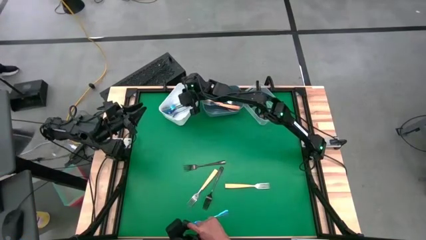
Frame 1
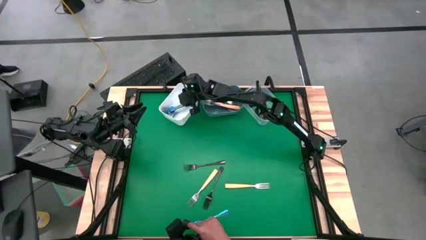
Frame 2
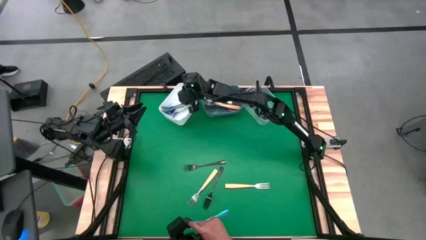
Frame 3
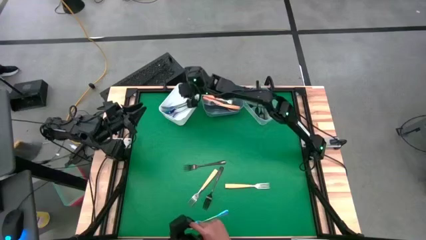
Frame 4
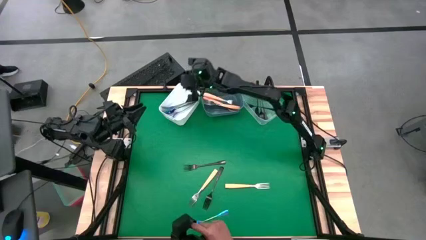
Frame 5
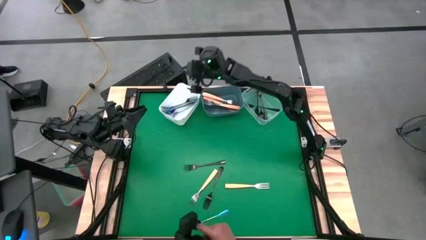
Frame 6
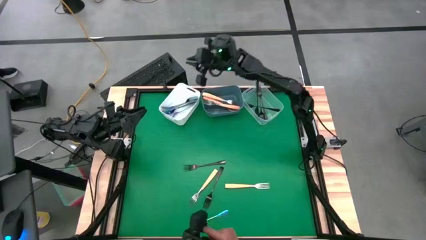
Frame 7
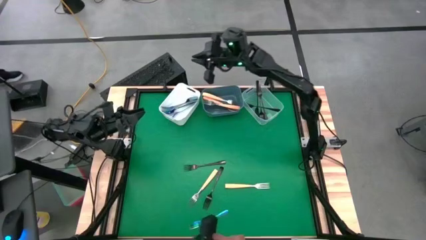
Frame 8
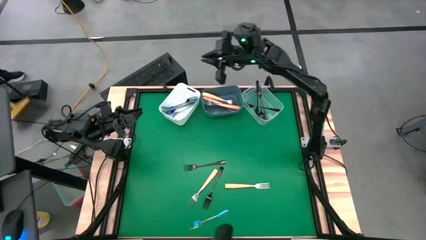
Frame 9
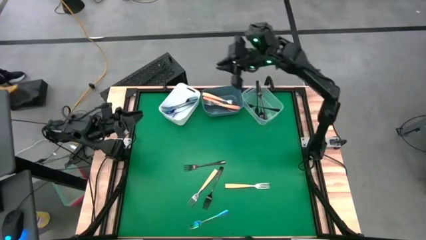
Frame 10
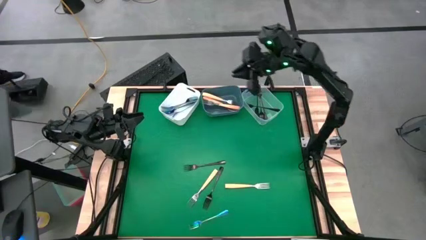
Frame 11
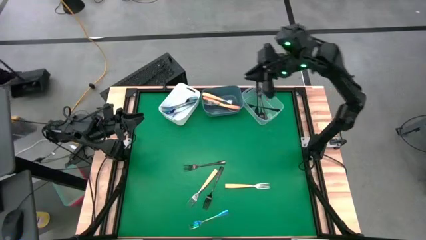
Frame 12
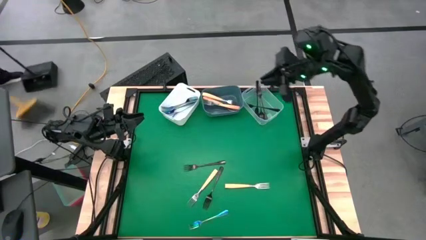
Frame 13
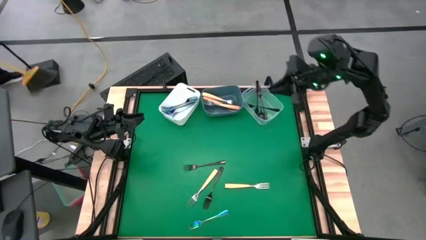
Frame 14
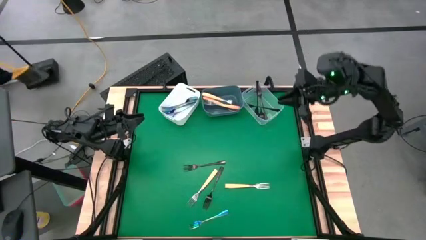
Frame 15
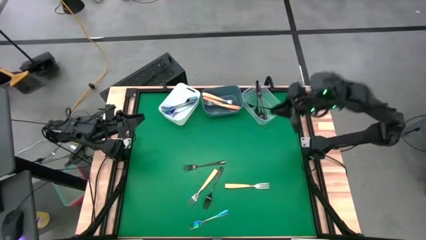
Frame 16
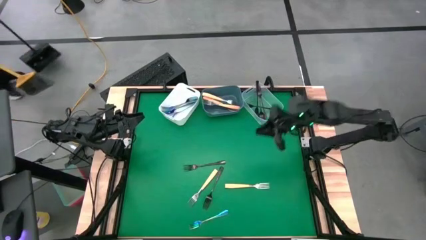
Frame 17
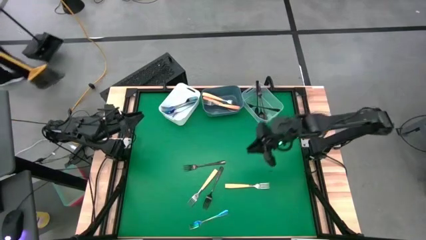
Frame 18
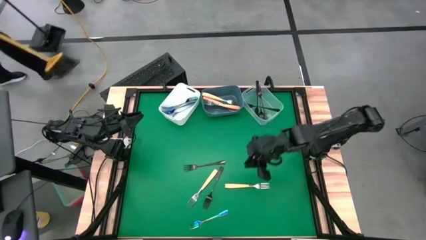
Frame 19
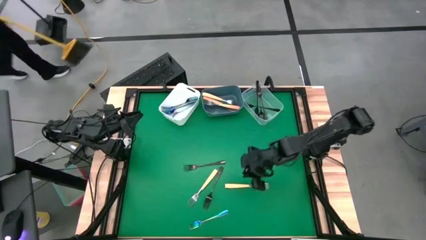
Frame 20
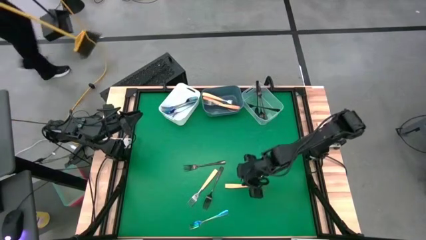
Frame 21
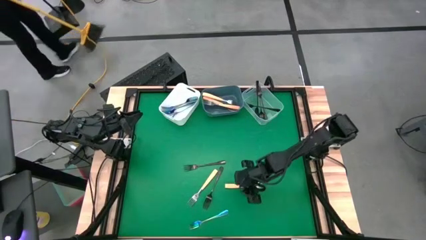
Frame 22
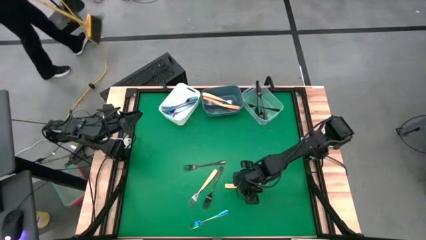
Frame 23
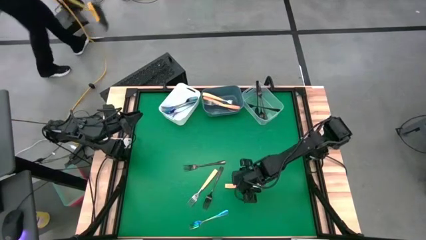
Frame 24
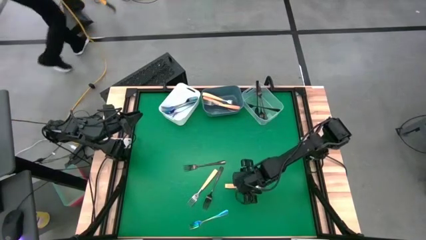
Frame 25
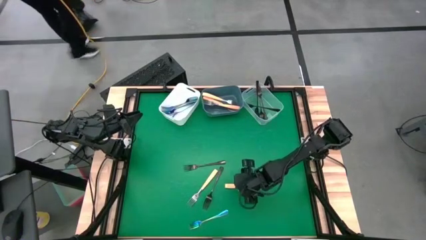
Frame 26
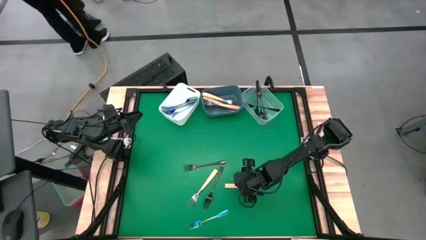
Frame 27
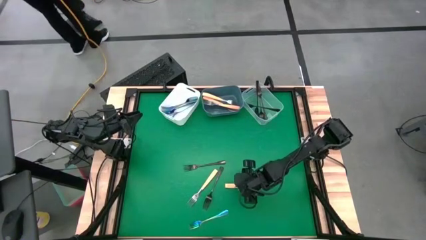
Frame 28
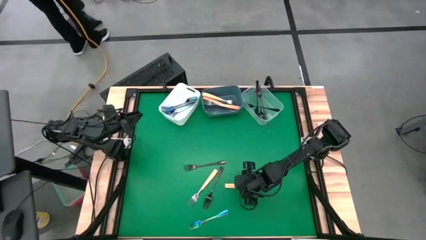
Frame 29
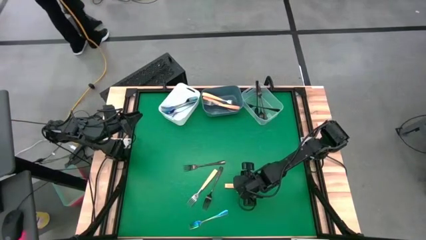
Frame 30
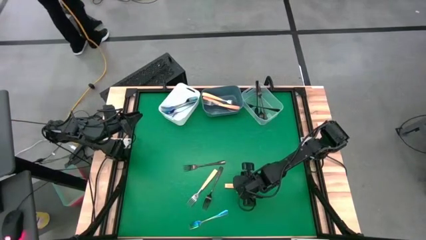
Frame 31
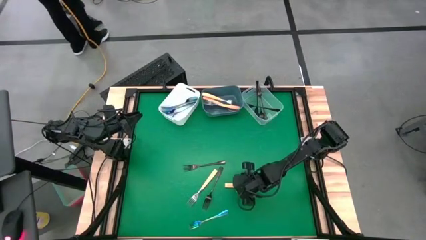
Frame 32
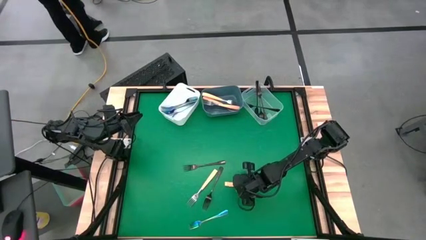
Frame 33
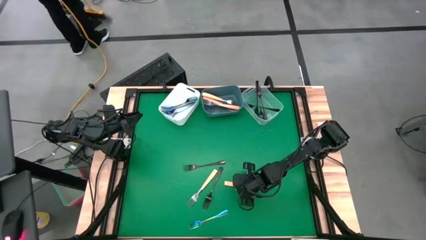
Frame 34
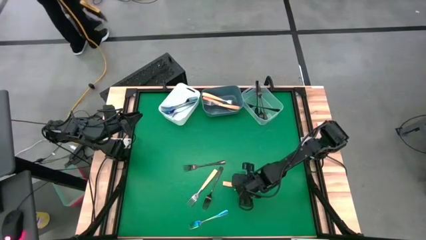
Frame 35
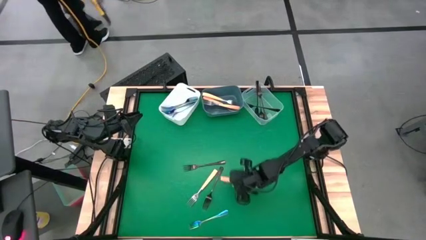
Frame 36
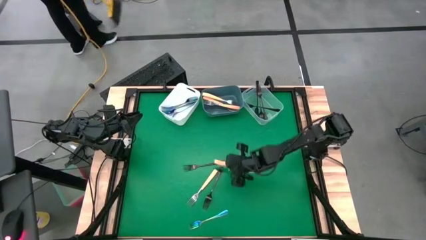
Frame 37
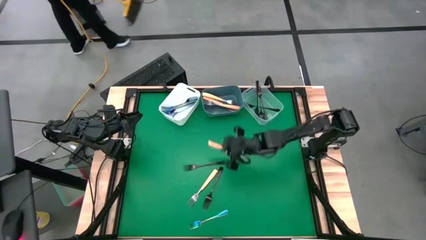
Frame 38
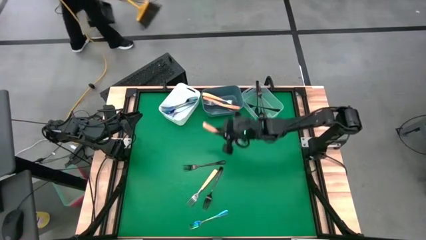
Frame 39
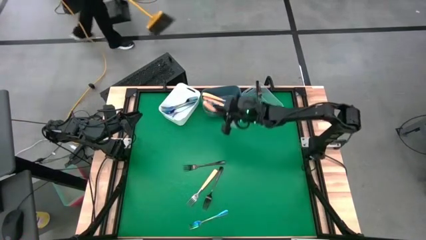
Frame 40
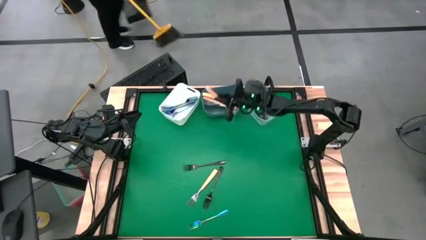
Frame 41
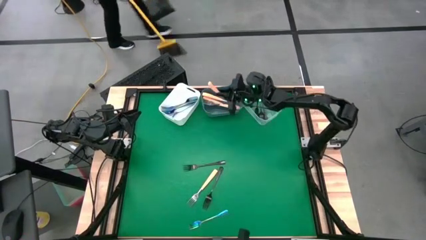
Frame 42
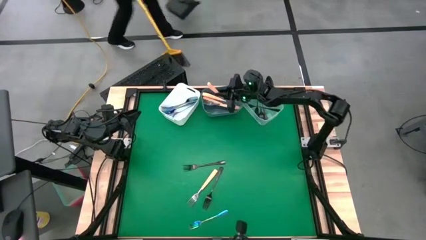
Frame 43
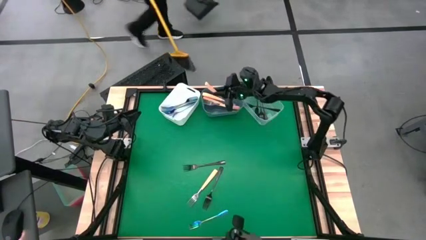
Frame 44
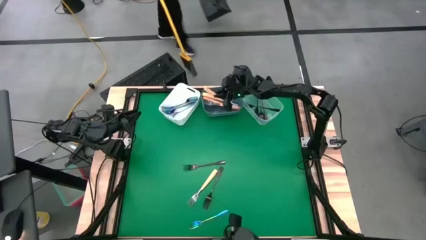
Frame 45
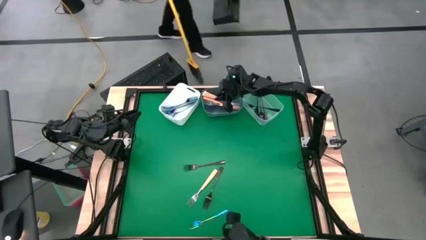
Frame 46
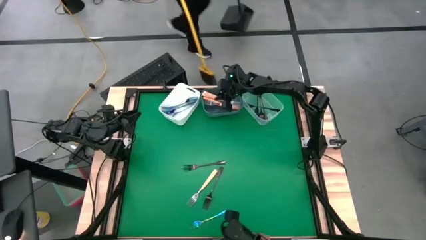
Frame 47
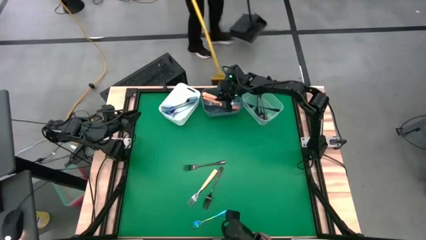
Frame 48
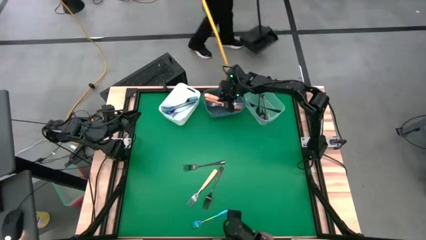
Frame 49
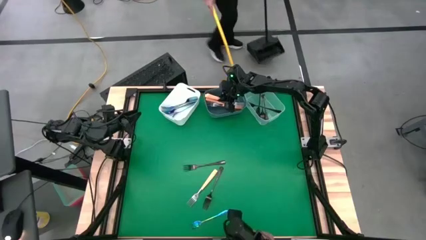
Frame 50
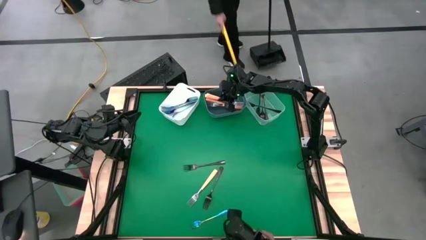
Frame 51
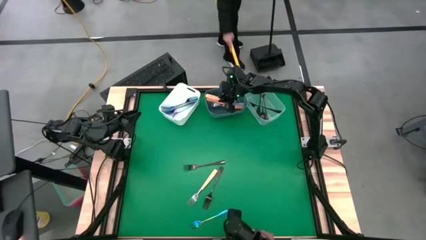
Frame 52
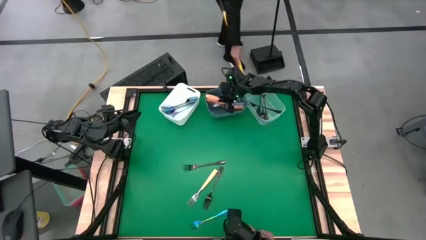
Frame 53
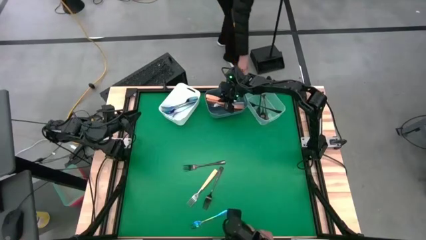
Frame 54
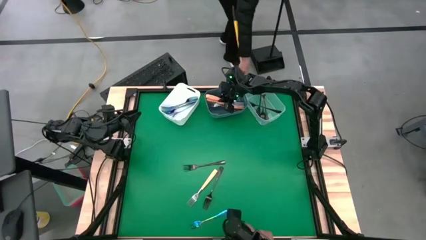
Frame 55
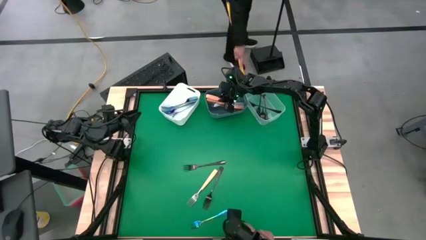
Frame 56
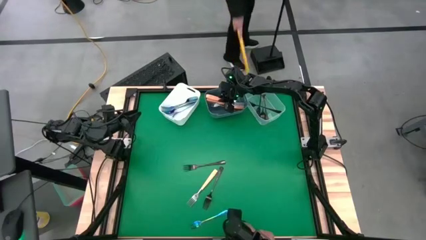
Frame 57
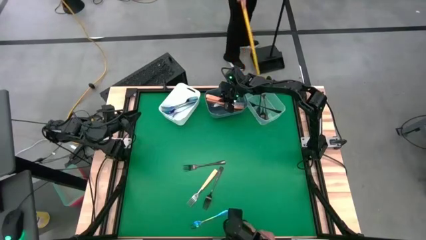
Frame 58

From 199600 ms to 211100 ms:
Task: Sort silverware by color (type)
Put the yellow fork into the blue bin

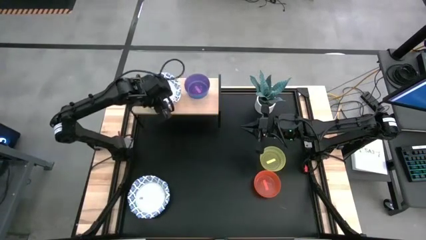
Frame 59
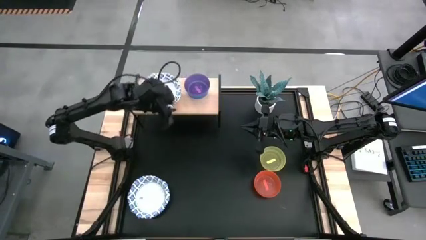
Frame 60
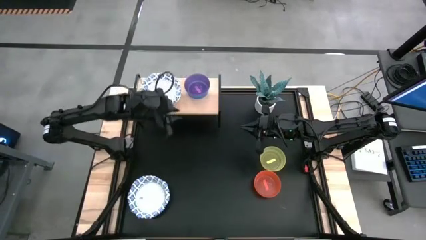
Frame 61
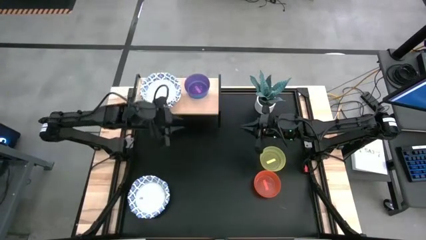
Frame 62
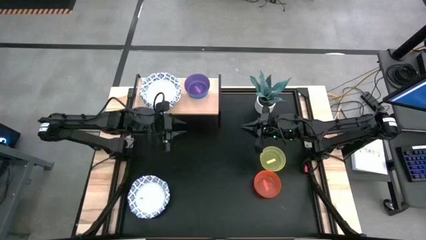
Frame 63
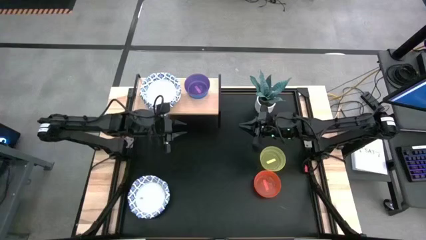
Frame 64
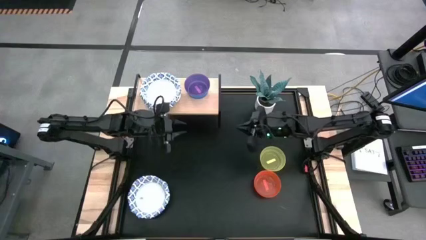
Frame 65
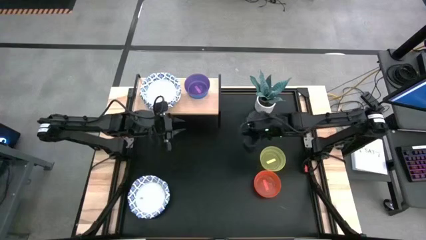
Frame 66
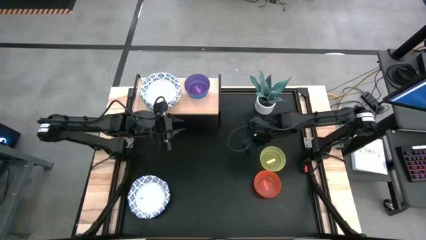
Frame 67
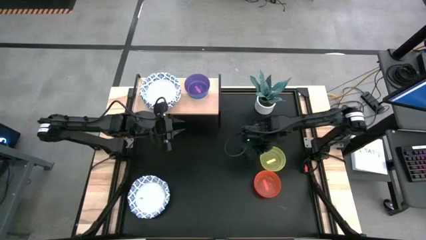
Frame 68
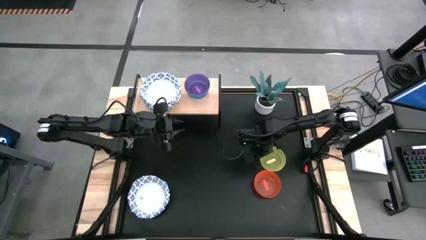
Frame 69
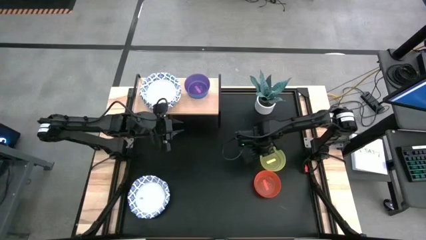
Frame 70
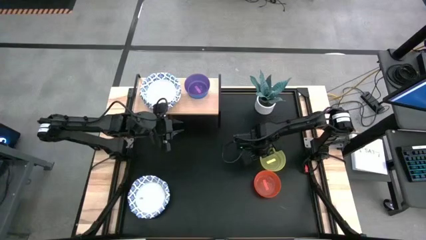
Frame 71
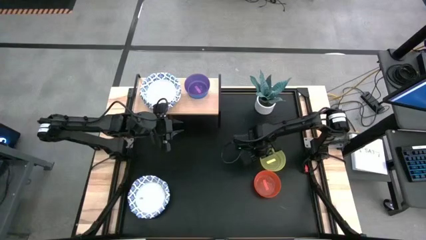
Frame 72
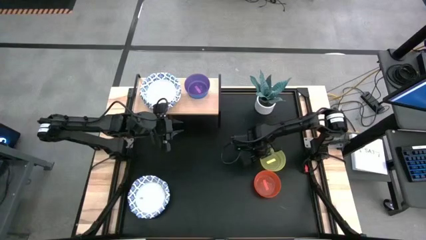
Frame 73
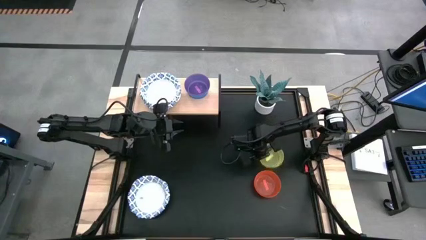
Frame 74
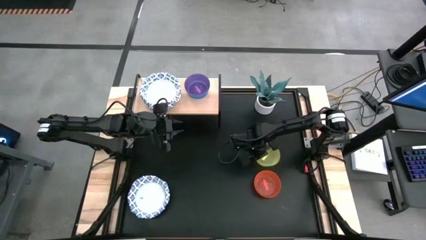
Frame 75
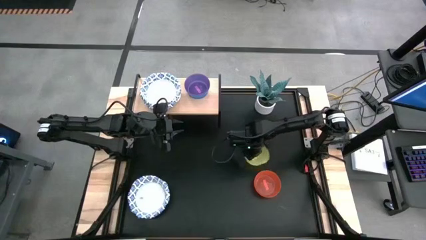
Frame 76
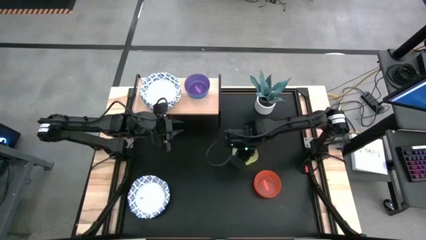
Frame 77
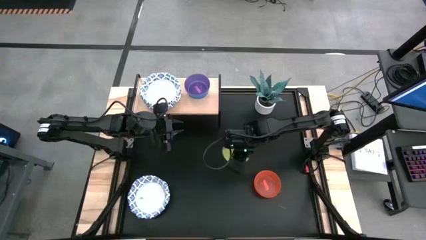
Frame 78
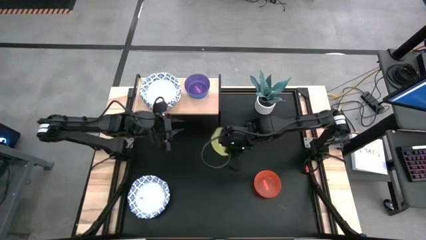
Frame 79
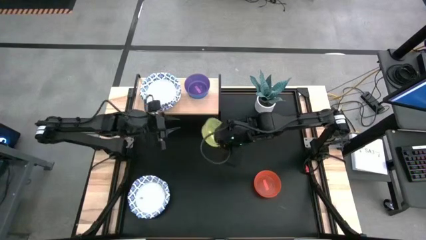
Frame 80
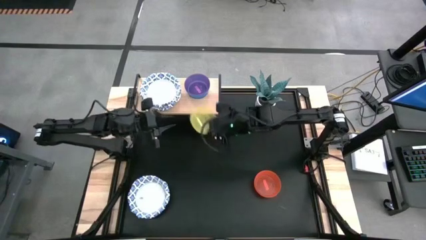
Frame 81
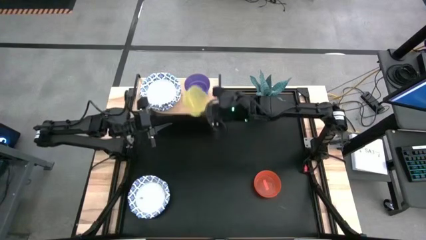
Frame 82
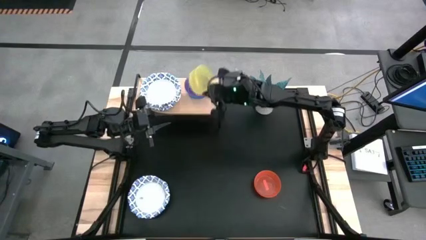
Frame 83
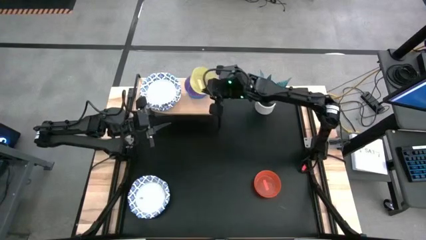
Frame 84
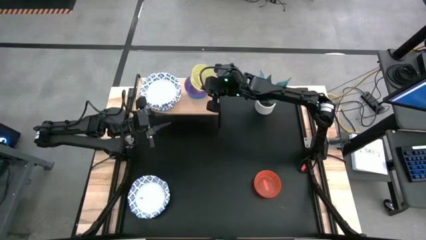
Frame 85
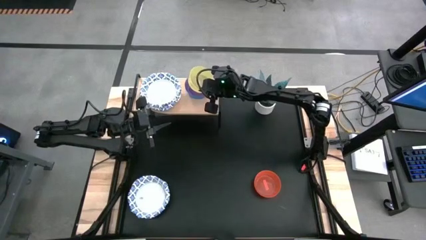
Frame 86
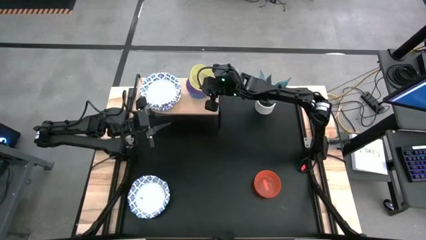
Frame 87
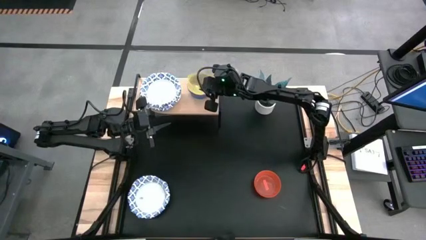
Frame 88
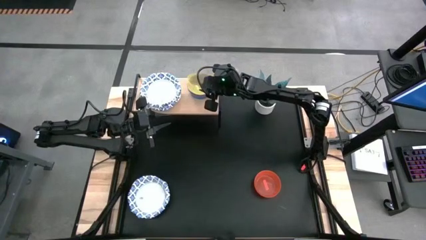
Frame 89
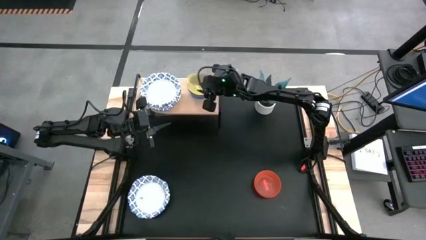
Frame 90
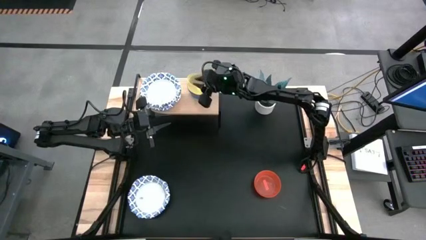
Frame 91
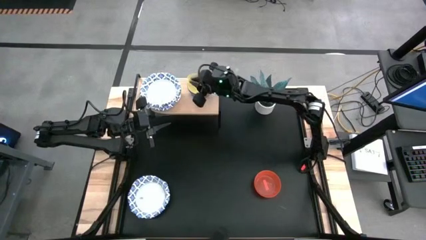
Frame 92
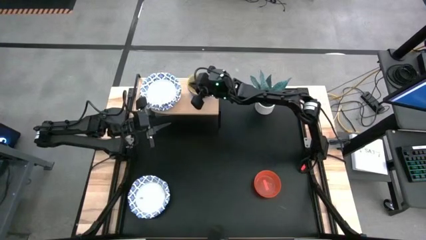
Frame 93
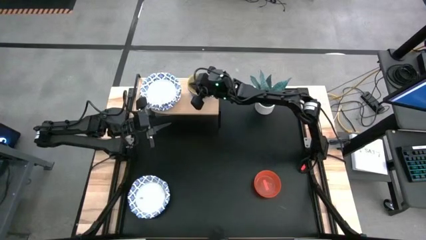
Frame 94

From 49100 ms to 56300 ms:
Task: Place and stack bowls onto a shelf
Stack the small yellow bowl on top of the small purple bowl on the shelf
